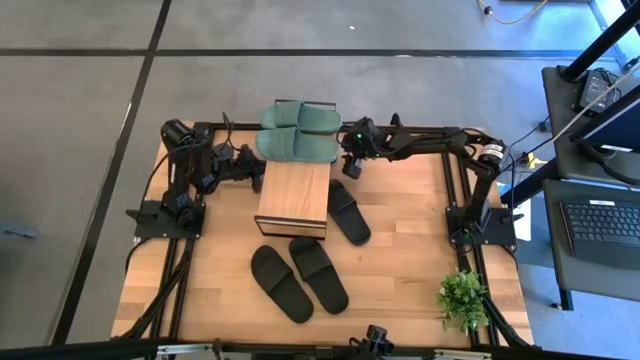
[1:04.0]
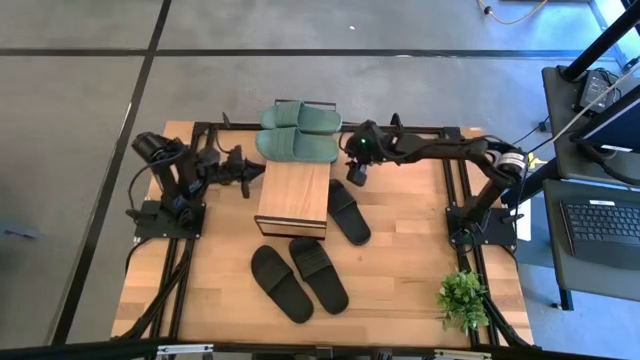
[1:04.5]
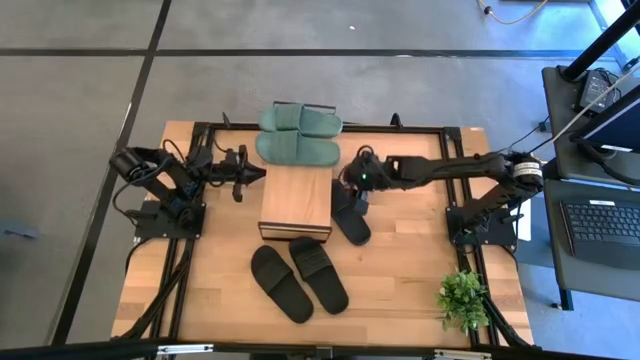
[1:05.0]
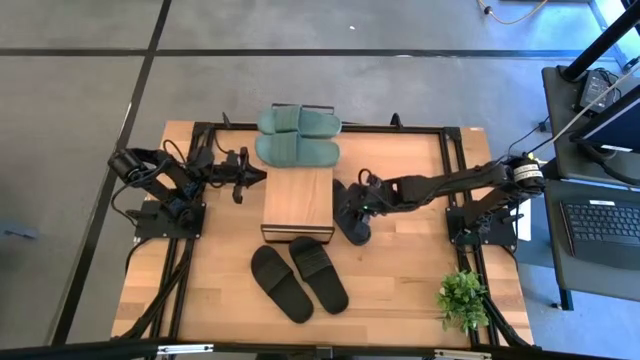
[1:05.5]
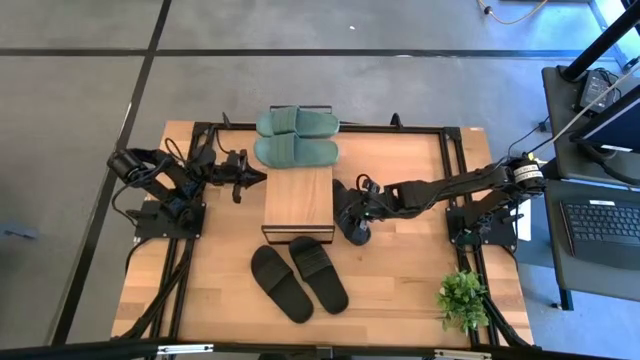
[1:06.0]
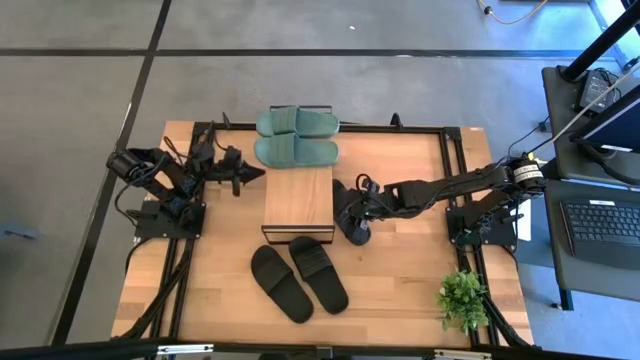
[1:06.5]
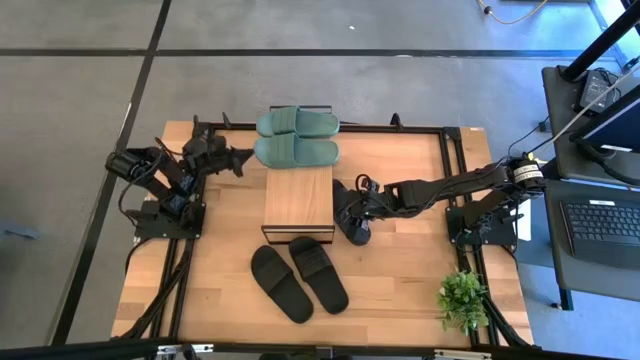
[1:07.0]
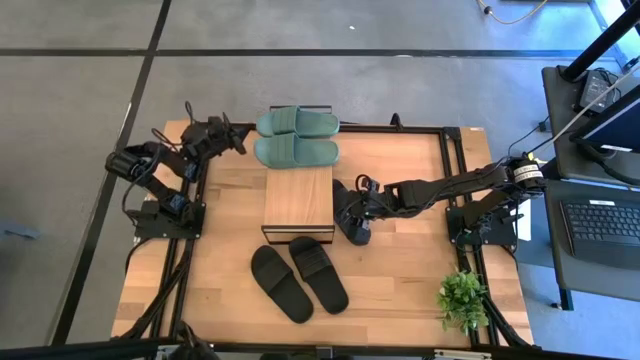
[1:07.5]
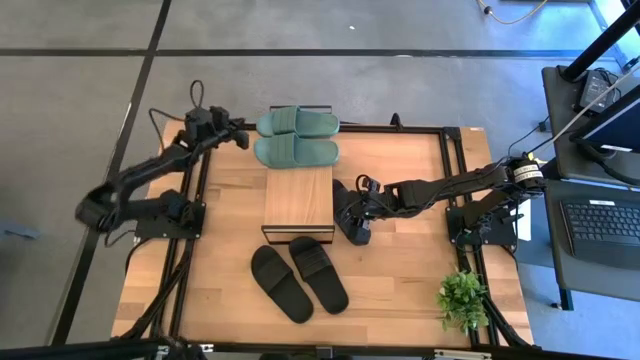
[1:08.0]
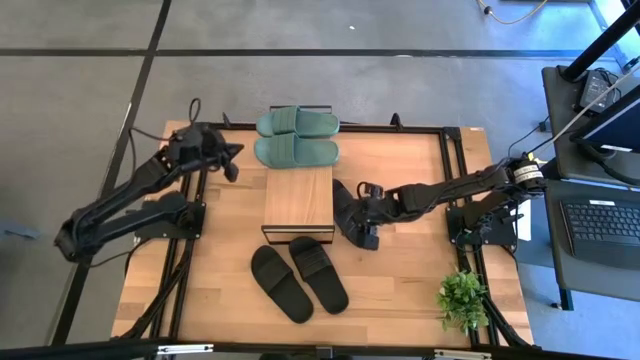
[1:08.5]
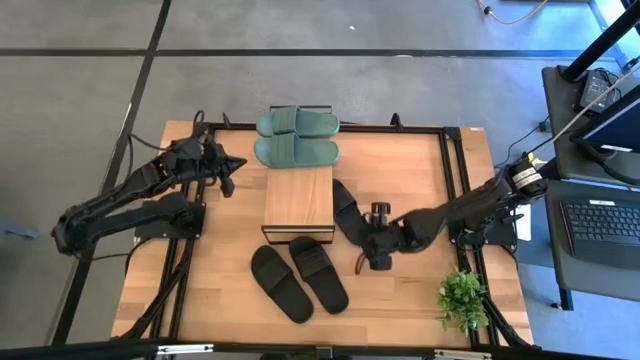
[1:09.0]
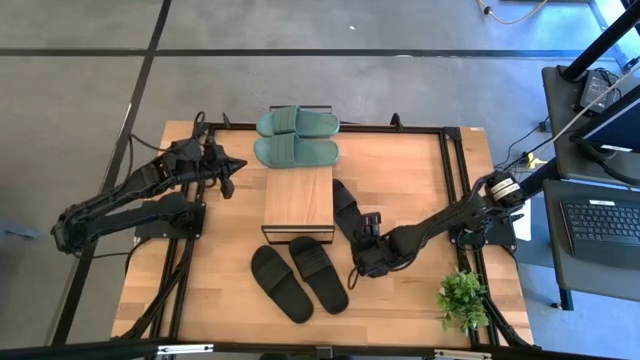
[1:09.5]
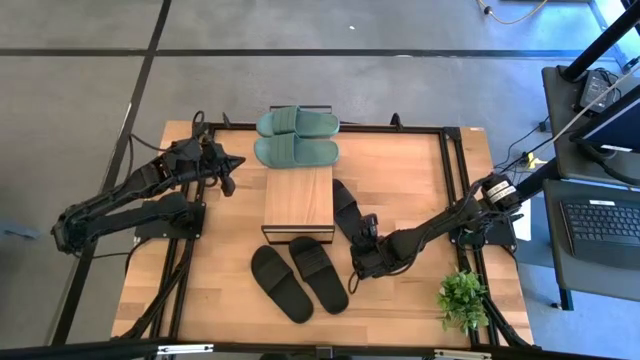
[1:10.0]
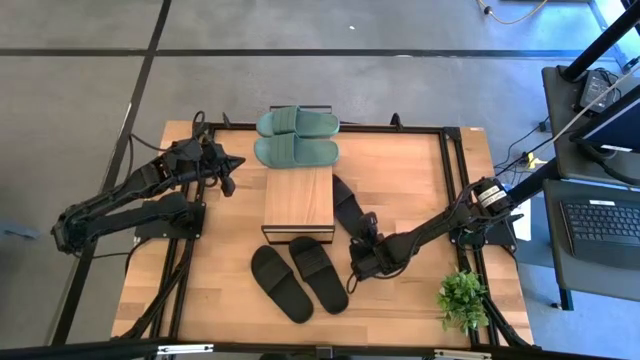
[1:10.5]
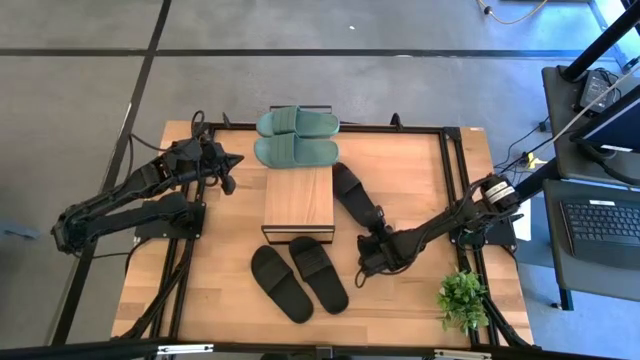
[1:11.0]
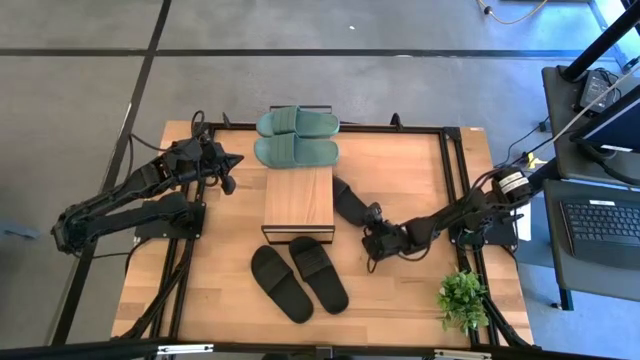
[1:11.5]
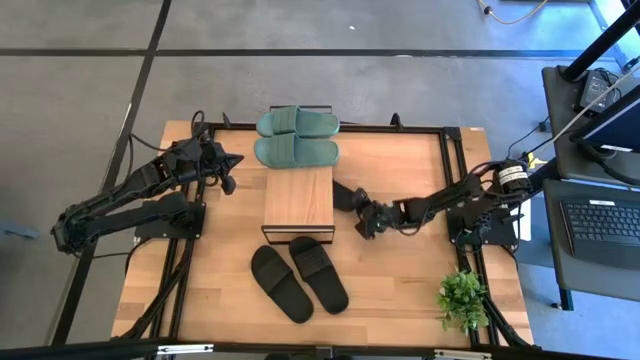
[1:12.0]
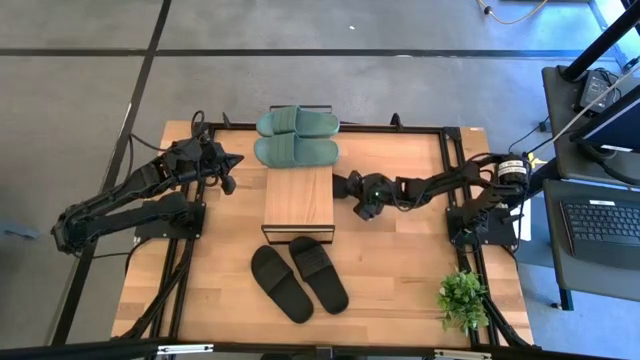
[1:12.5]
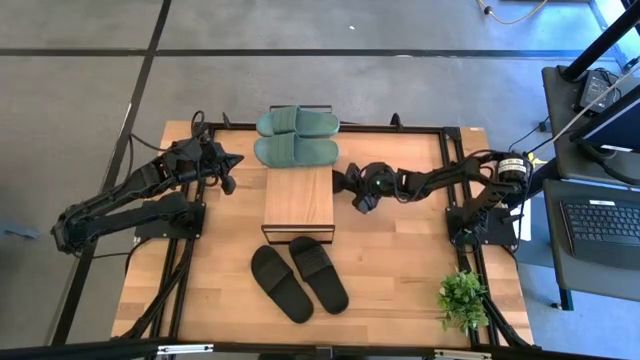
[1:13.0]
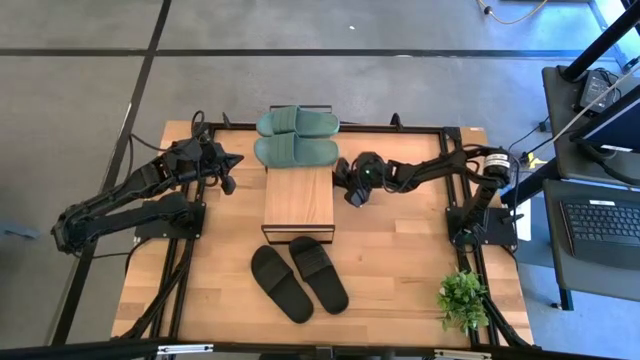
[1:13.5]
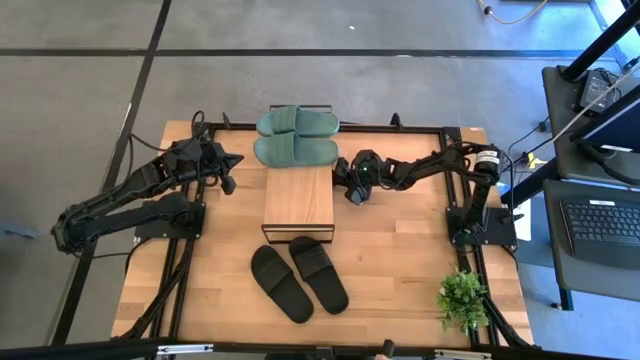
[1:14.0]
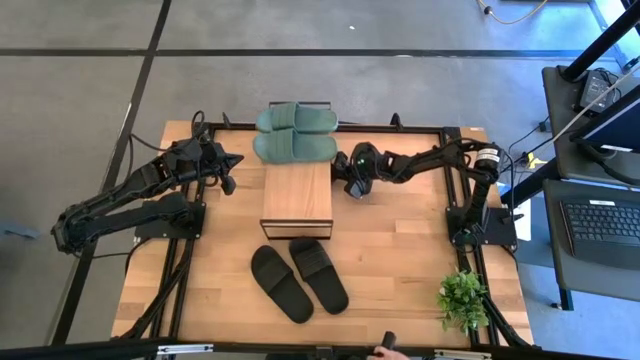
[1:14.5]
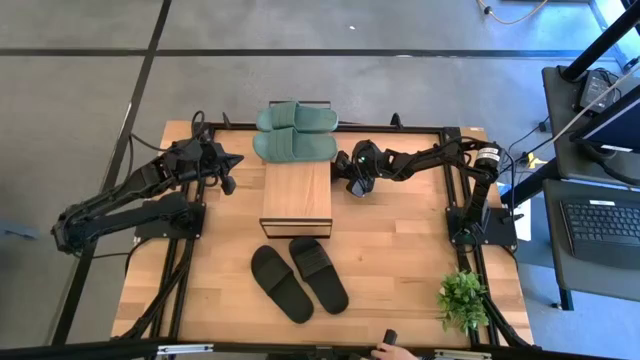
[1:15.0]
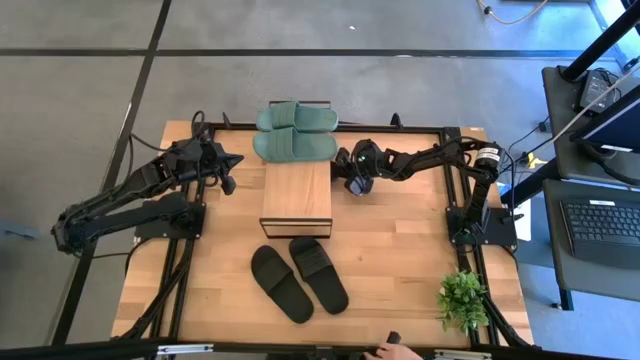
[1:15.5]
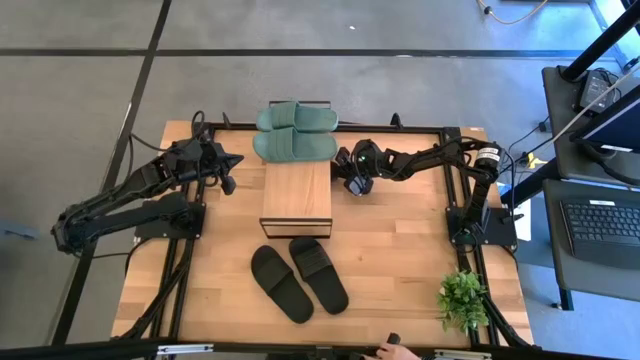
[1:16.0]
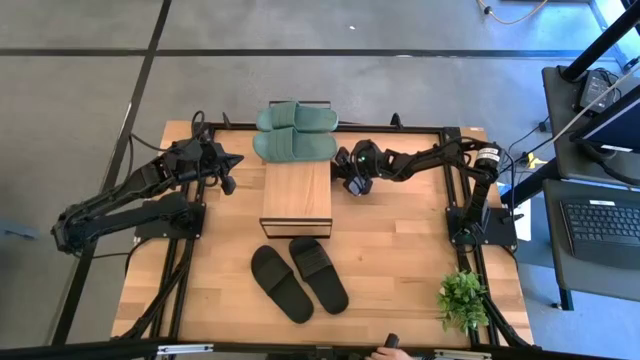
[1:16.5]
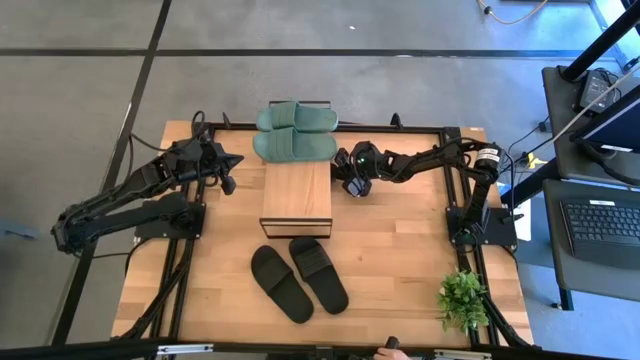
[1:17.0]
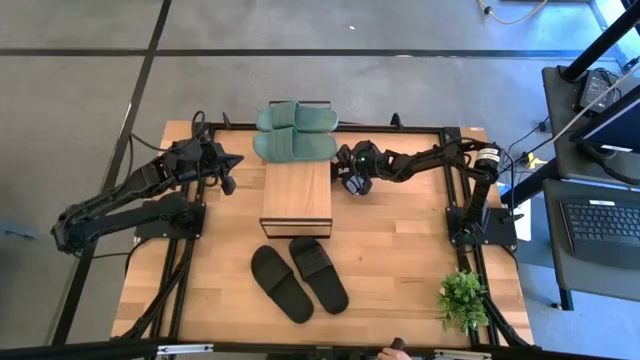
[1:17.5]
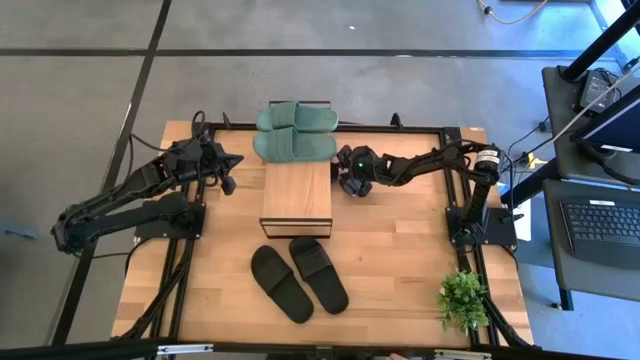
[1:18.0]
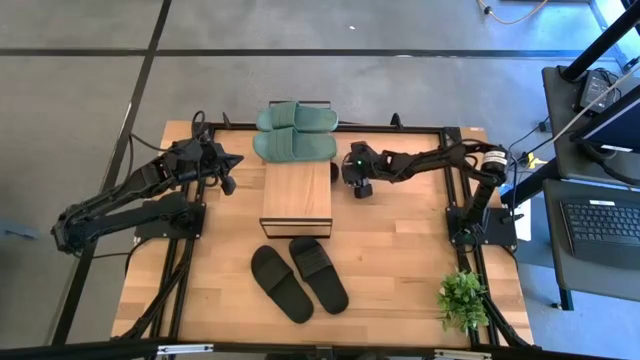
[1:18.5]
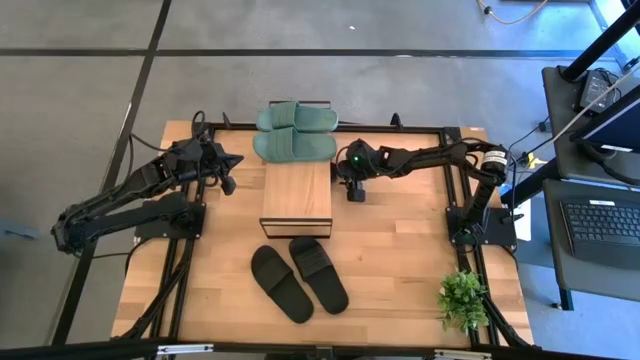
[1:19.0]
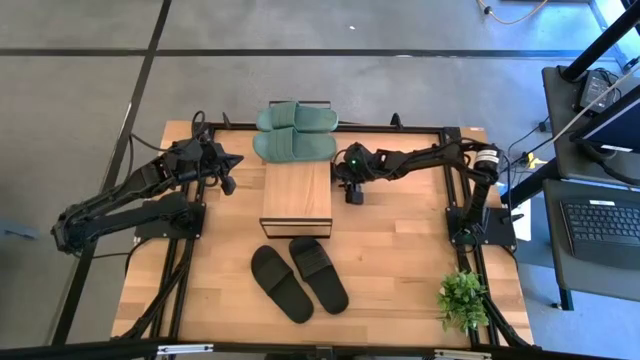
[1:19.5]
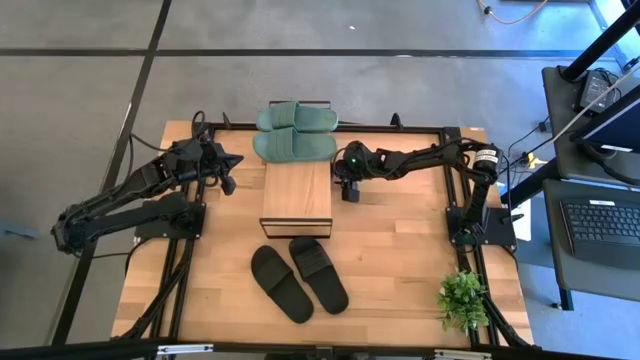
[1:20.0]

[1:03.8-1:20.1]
Task: Pick and place slides into the shelf
Put the black slide under the shelf

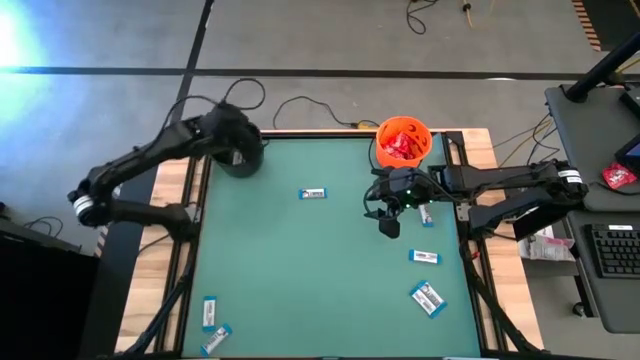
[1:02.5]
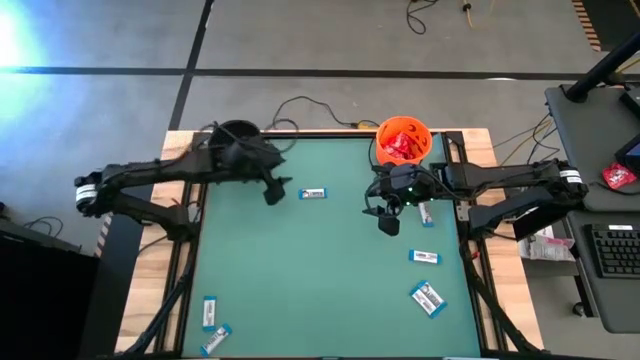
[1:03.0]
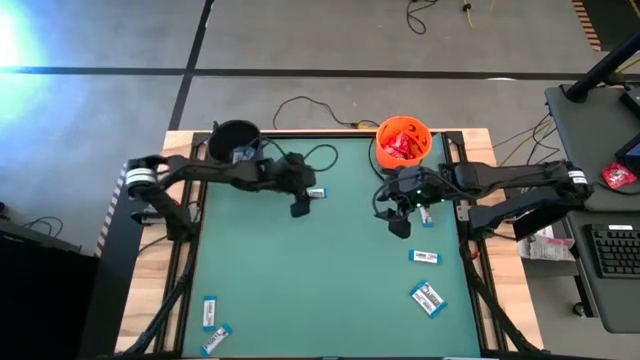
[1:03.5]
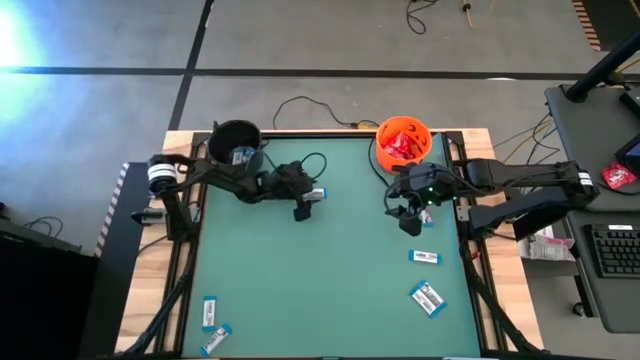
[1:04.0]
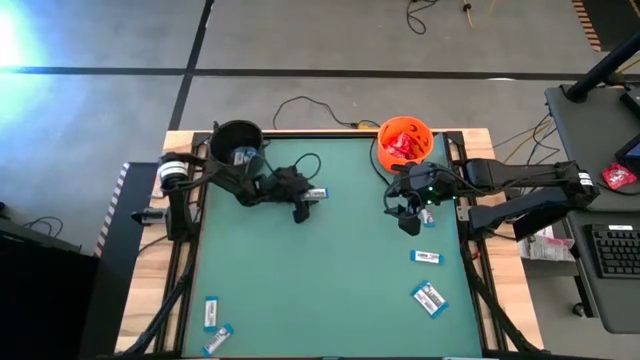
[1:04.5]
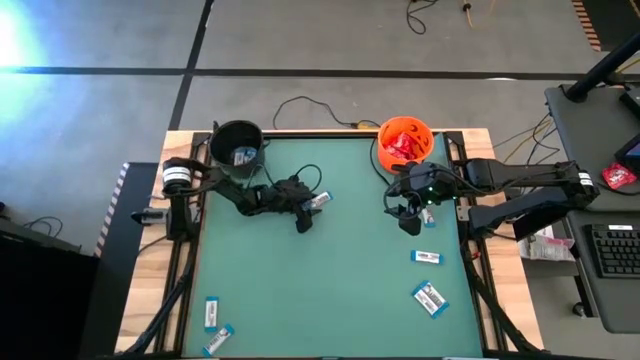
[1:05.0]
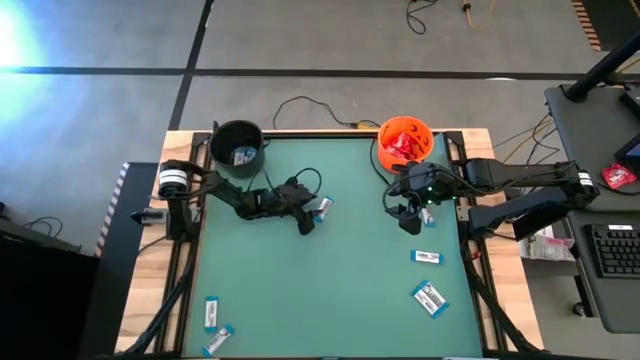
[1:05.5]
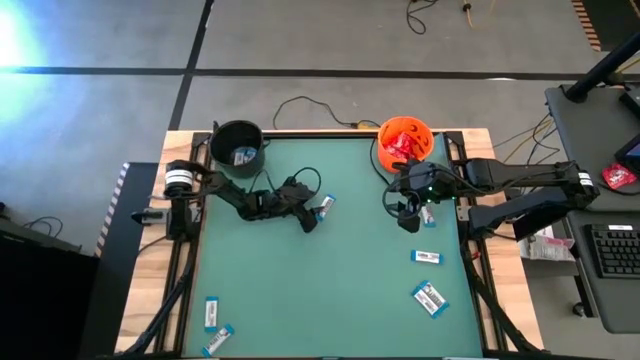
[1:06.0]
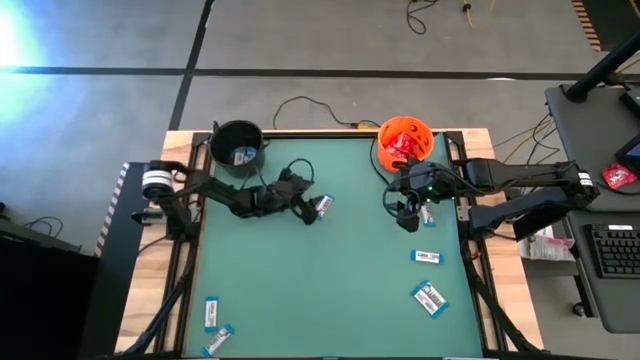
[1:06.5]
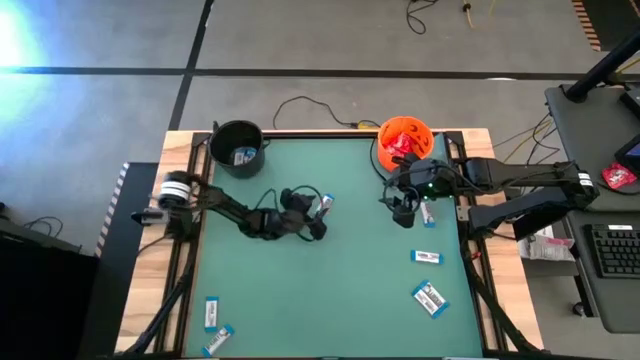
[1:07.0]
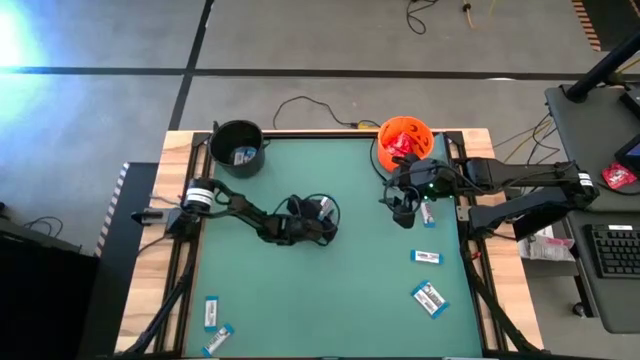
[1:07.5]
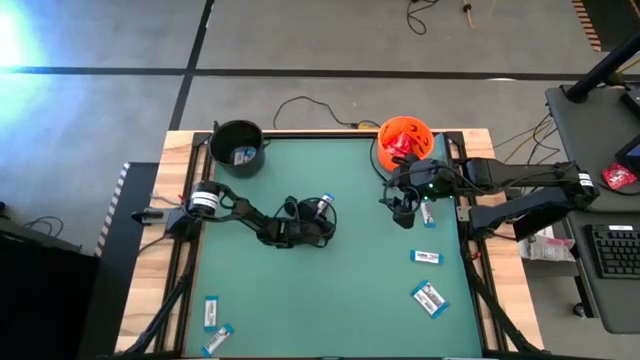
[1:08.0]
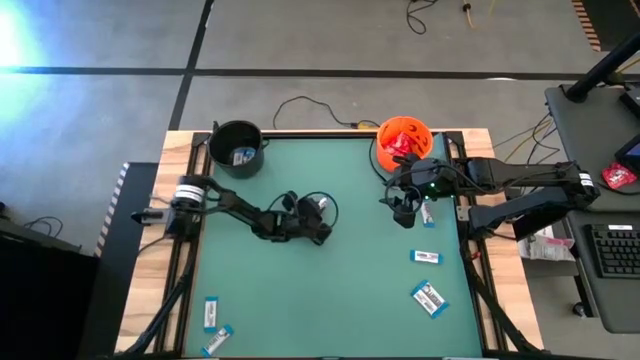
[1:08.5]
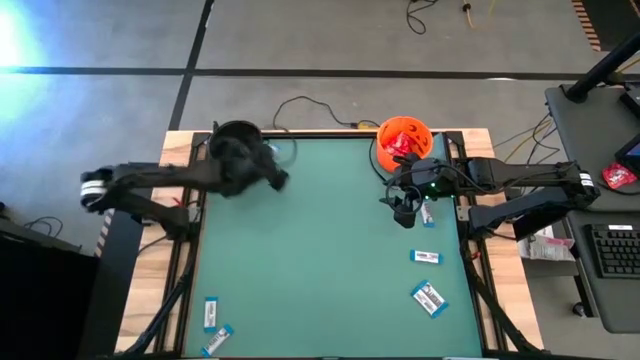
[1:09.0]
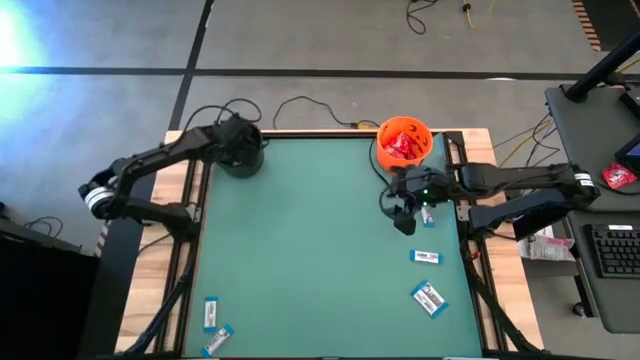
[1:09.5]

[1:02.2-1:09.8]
Task: Sort candy by brand, put in halloween buckets
Put the white candy into the black bucket
